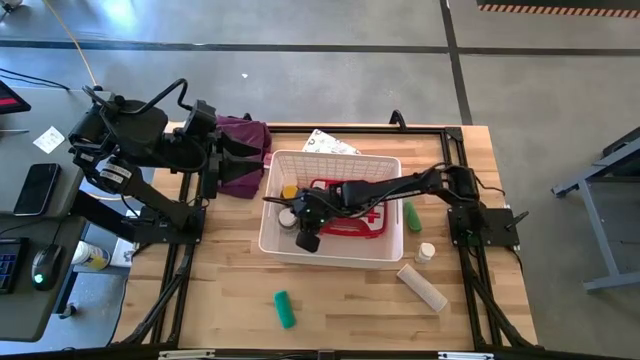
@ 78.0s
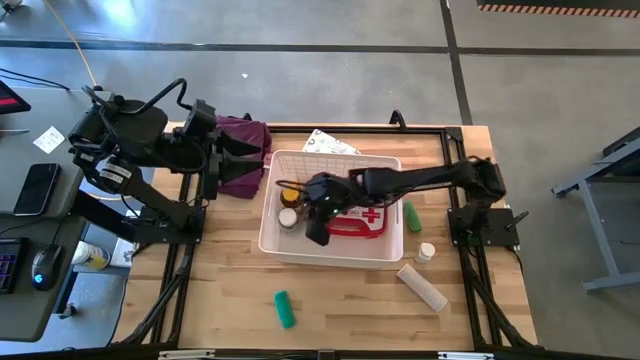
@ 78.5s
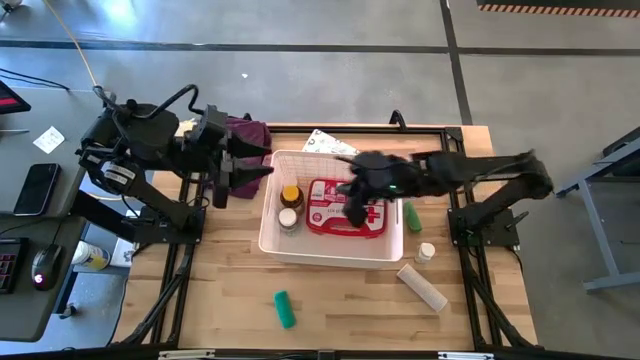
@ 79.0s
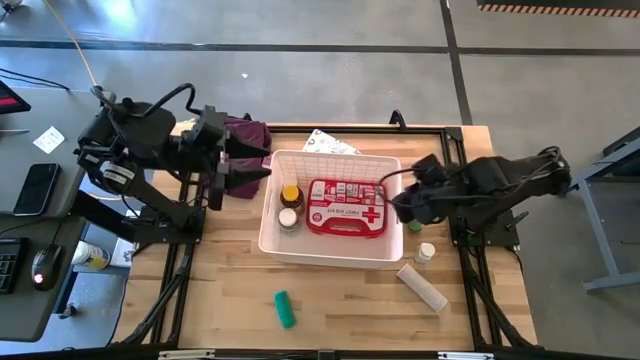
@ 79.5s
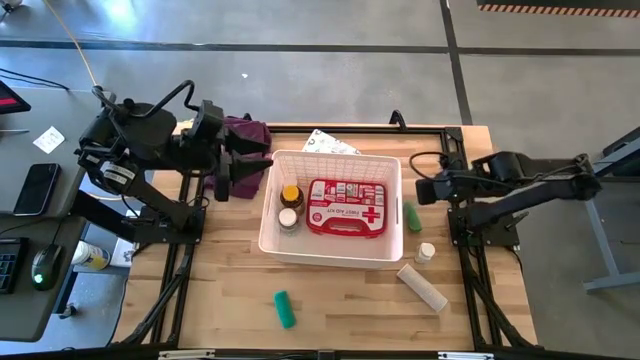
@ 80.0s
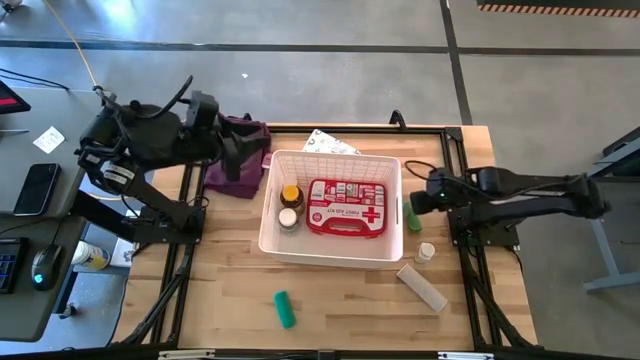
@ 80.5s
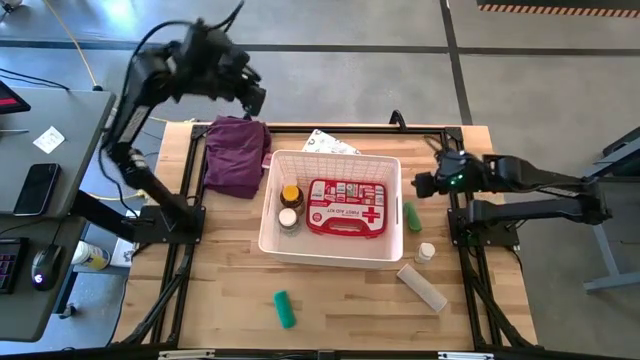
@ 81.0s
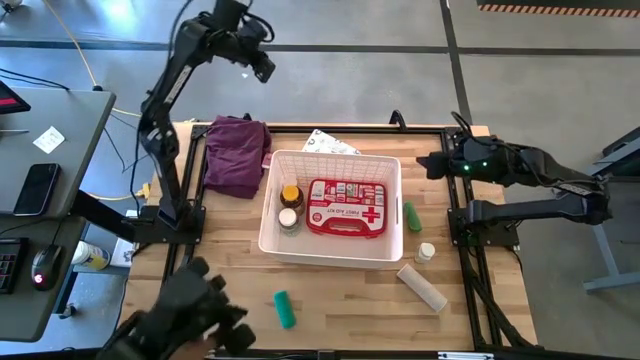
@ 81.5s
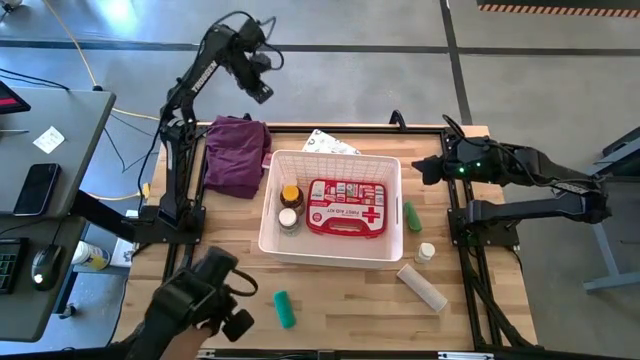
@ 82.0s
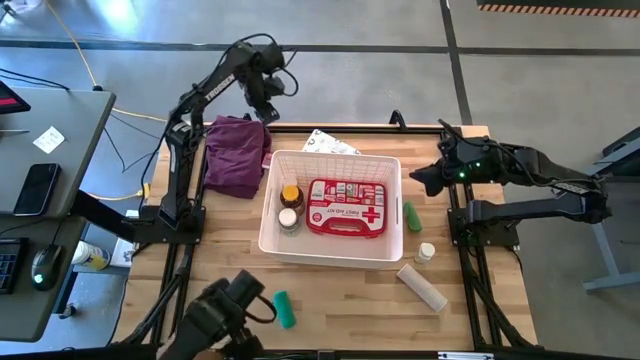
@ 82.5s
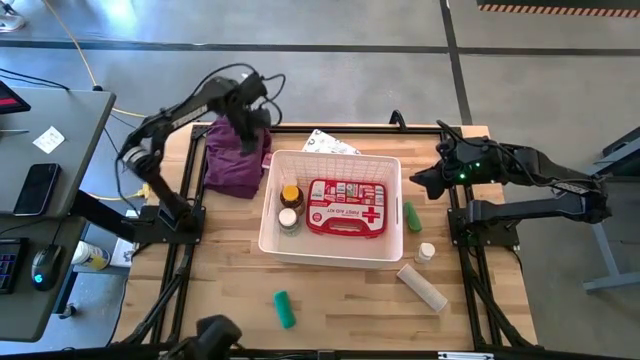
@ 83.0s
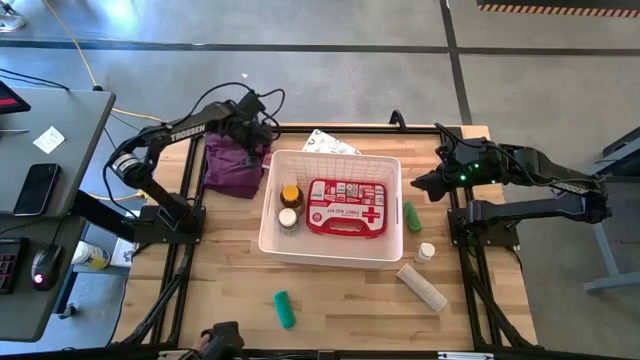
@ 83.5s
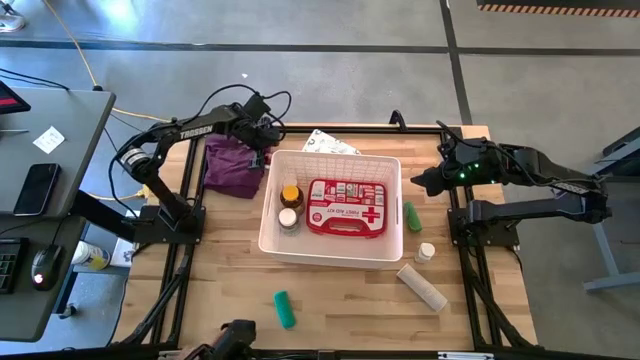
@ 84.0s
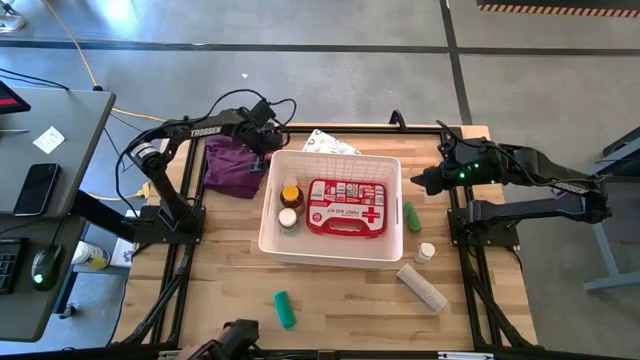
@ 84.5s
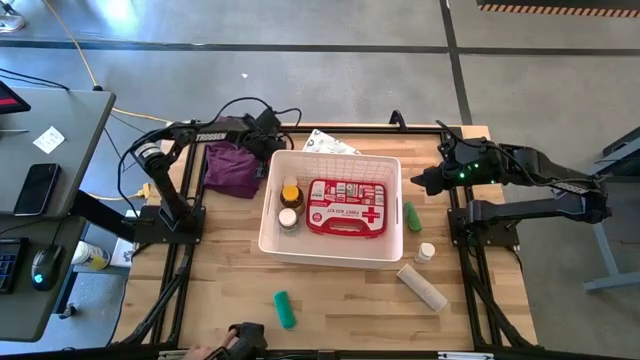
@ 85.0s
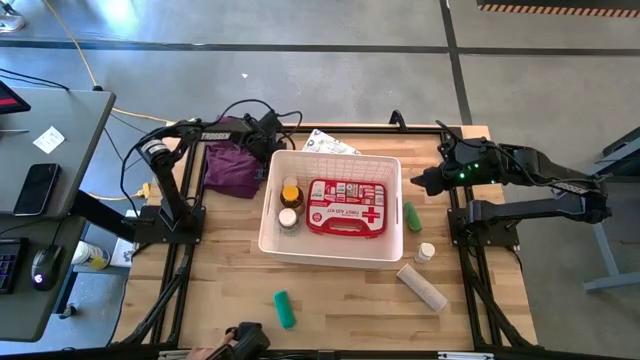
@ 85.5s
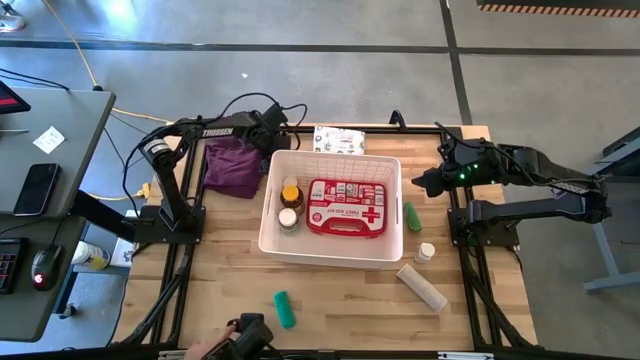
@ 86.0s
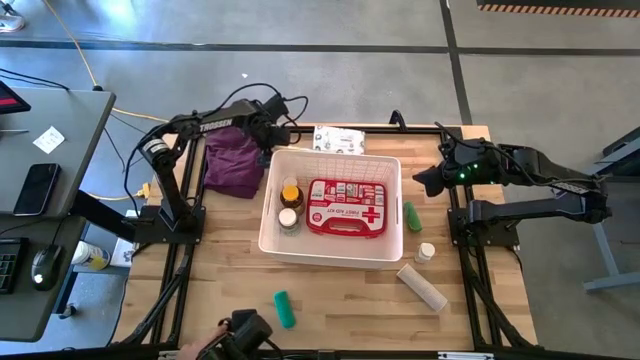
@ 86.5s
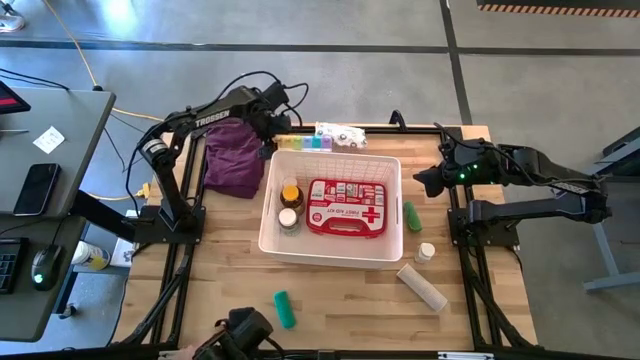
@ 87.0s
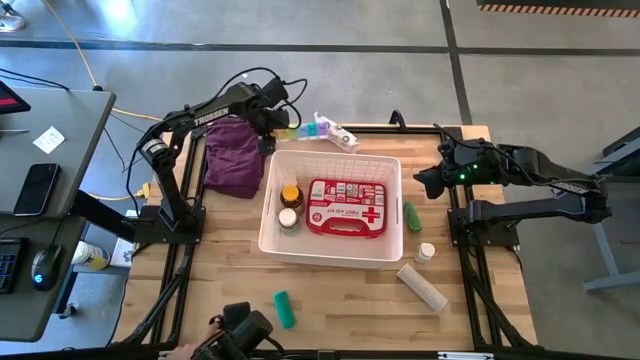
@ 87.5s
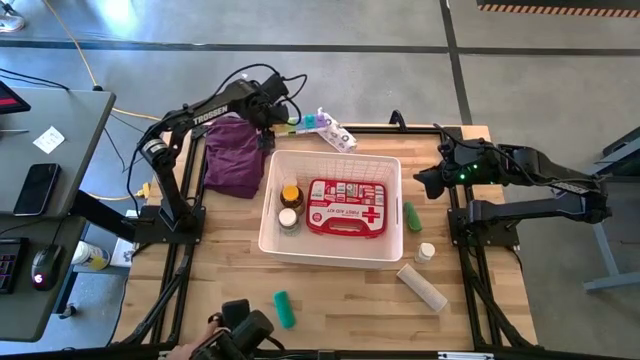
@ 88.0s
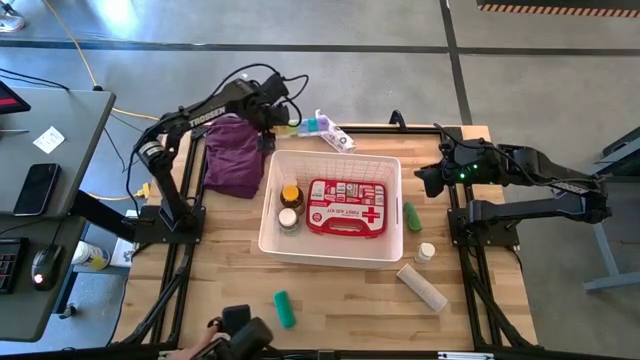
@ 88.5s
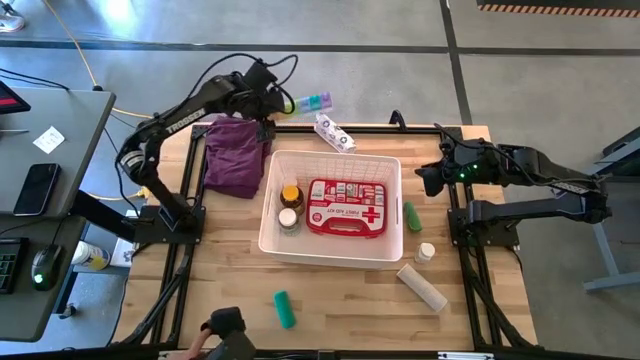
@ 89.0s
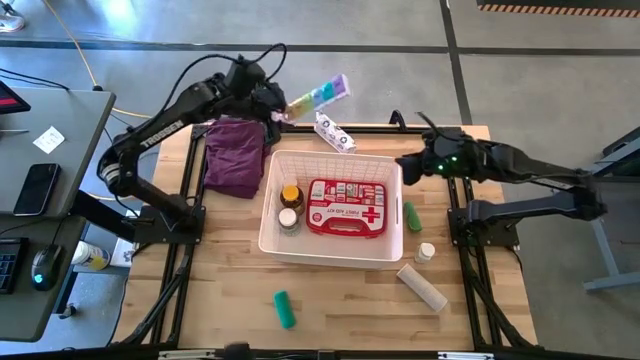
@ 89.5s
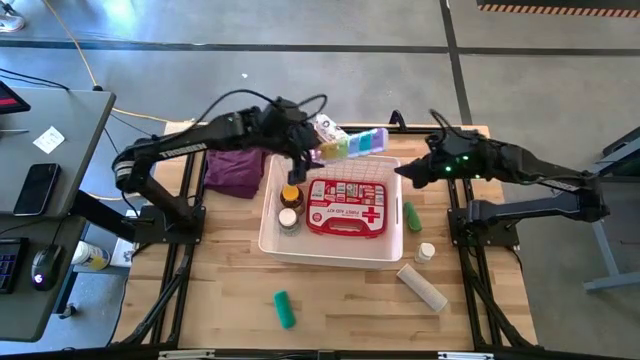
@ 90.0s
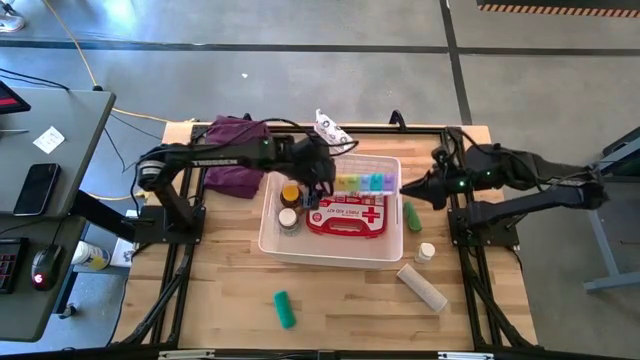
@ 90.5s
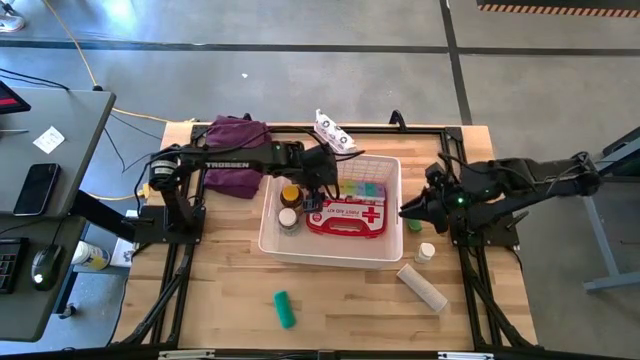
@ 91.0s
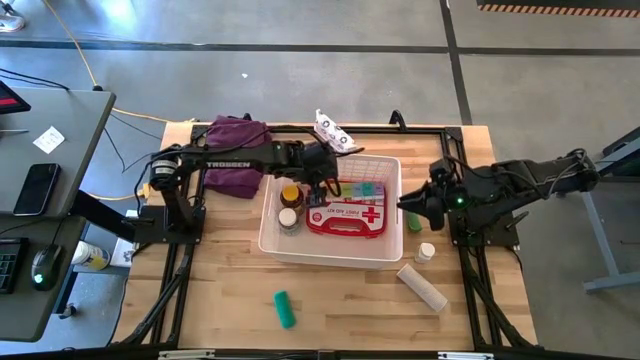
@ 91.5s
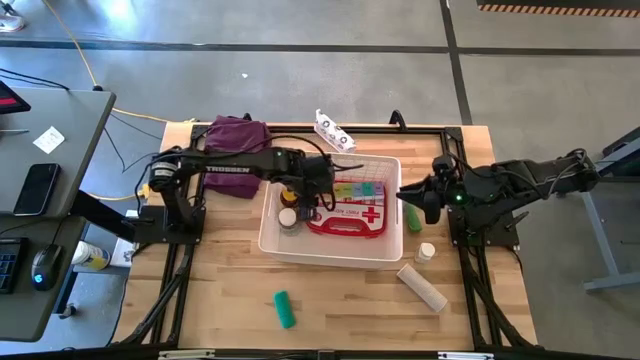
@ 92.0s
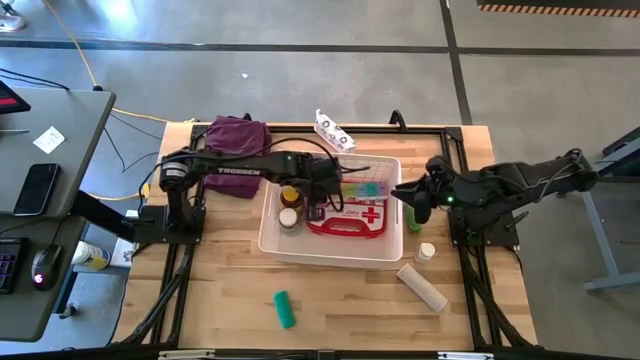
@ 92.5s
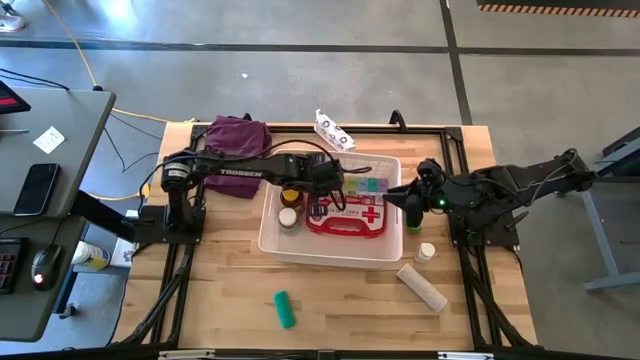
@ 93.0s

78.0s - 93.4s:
Task: Pick & place medical supplies in basket/bin
Put the medicine organizer into the white bin

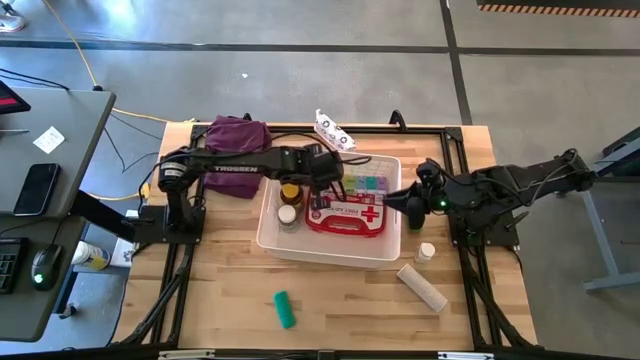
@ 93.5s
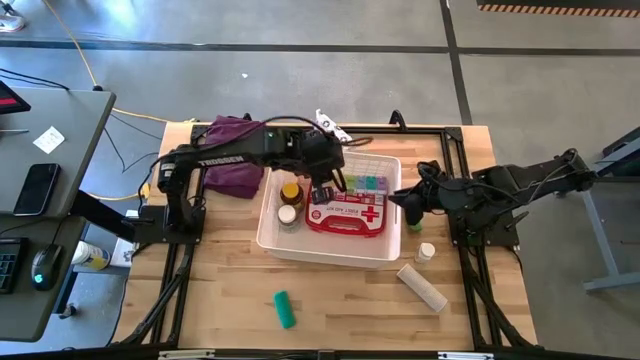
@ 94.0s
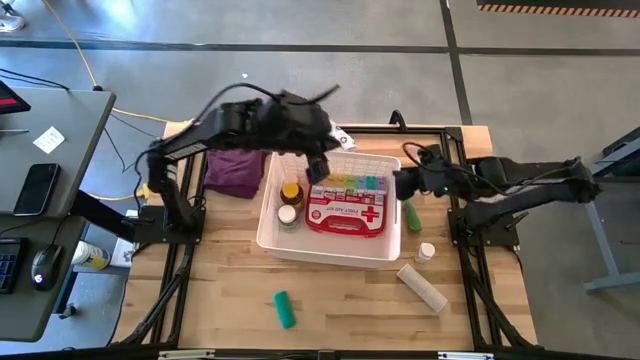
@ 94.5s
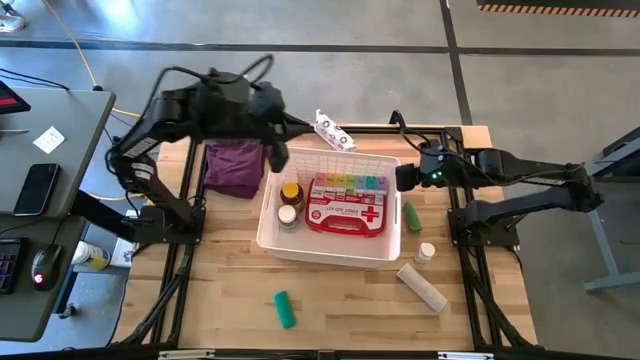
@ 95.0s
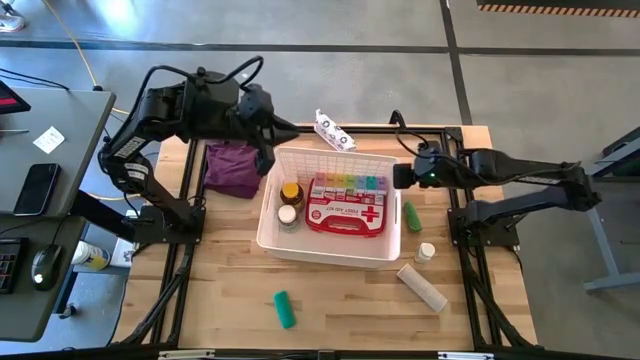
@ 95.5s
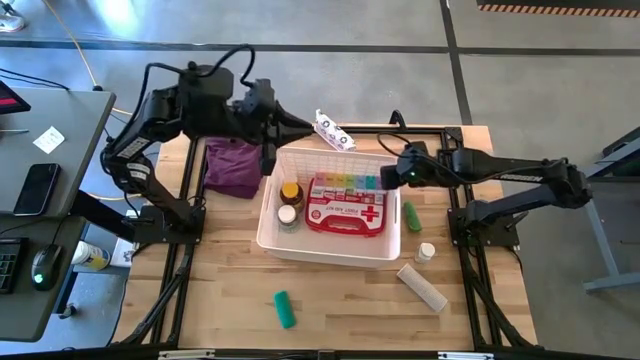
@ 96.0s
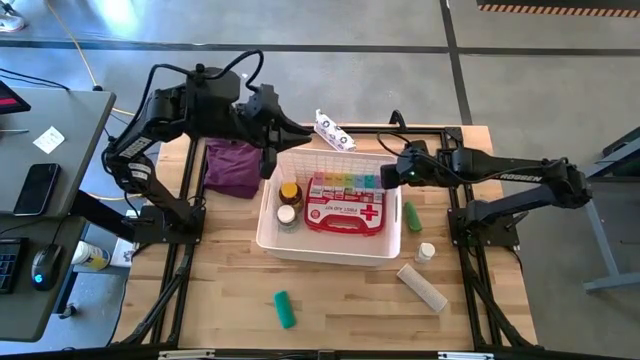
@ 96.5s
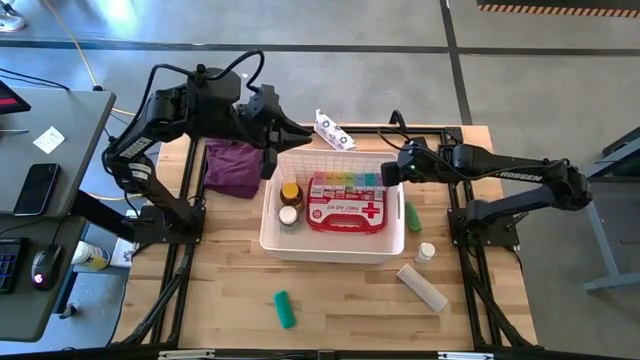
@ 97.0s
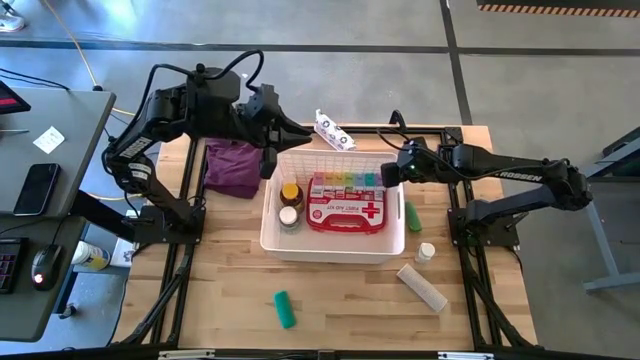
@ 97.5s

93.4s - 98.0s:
Adjust the white bin
